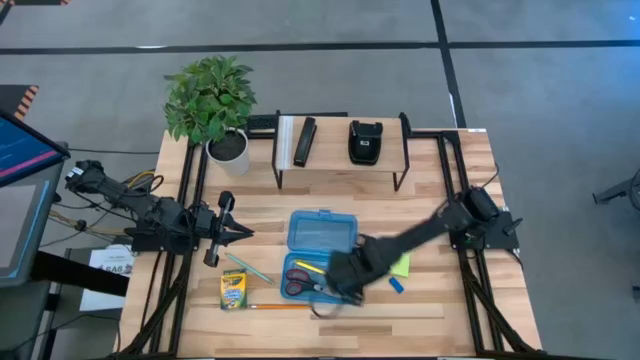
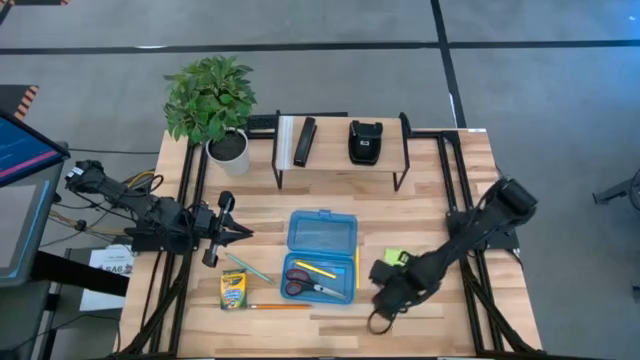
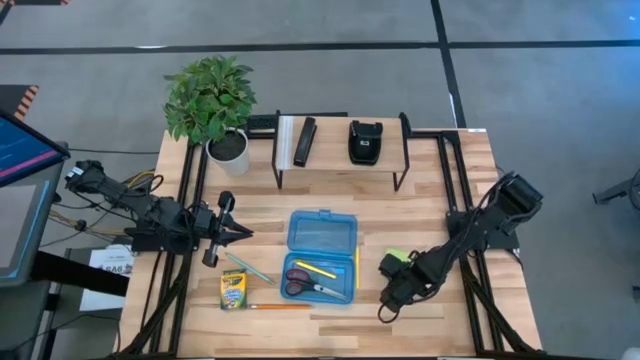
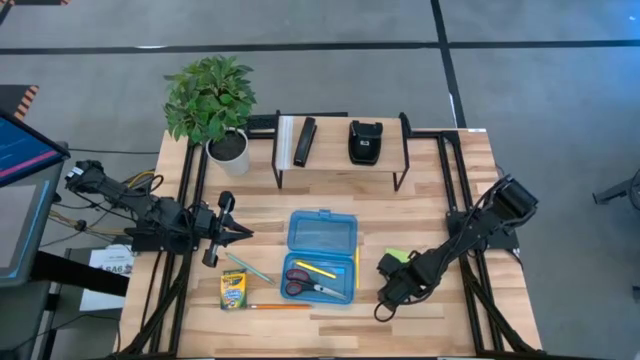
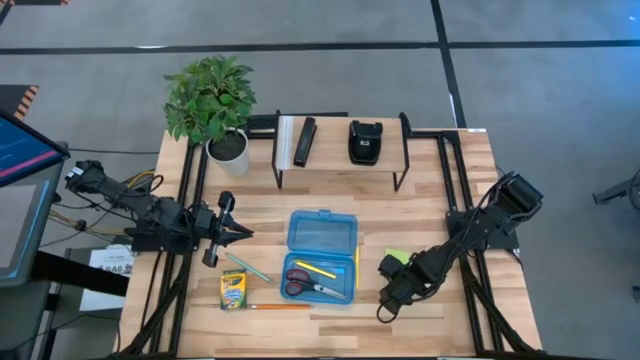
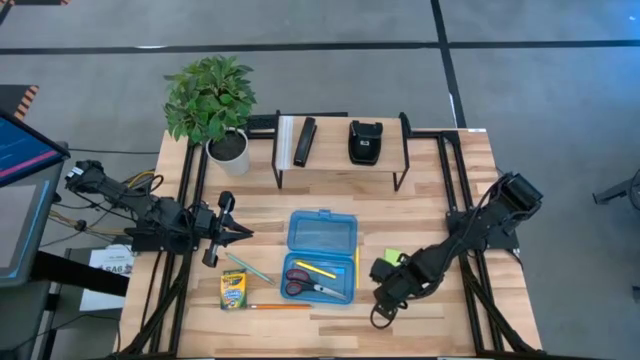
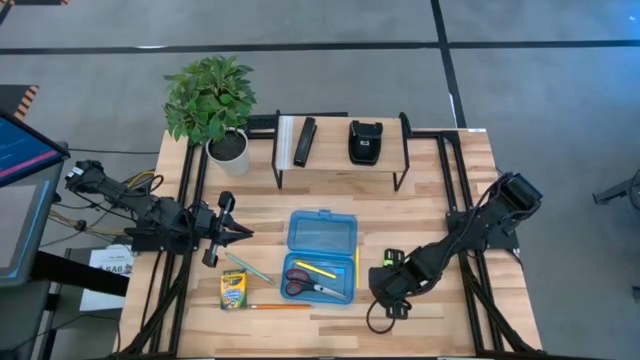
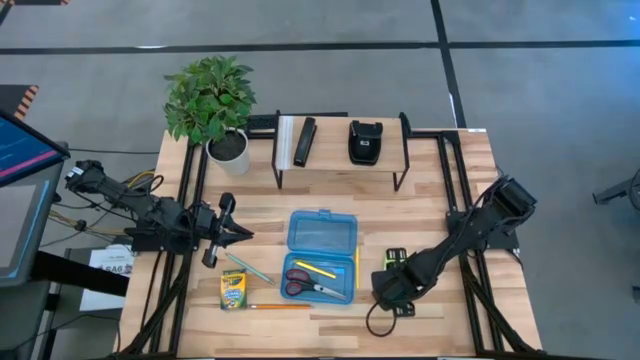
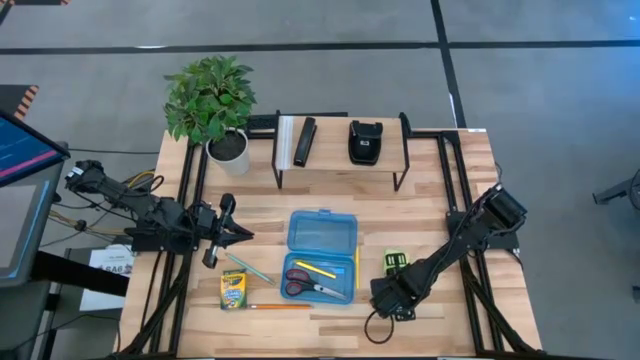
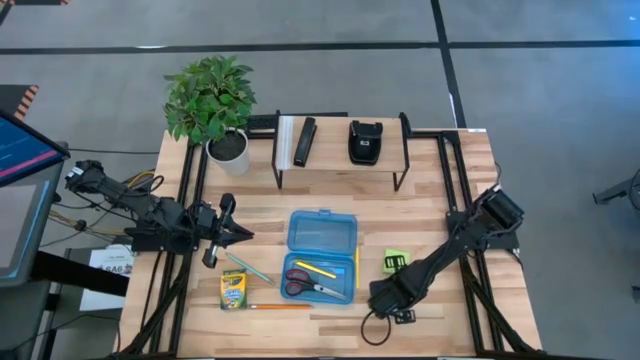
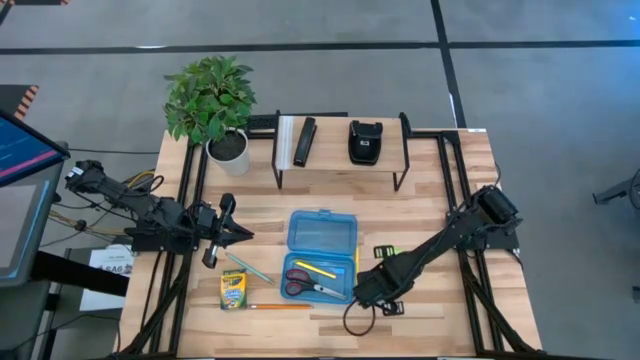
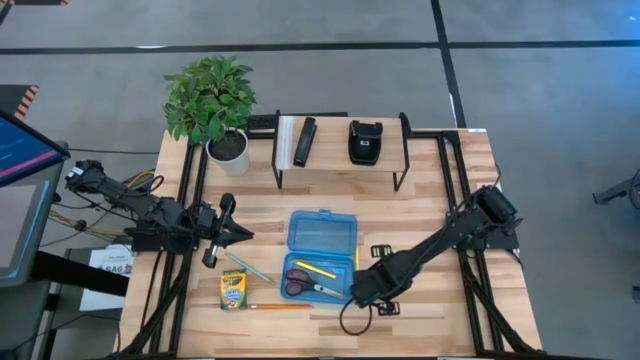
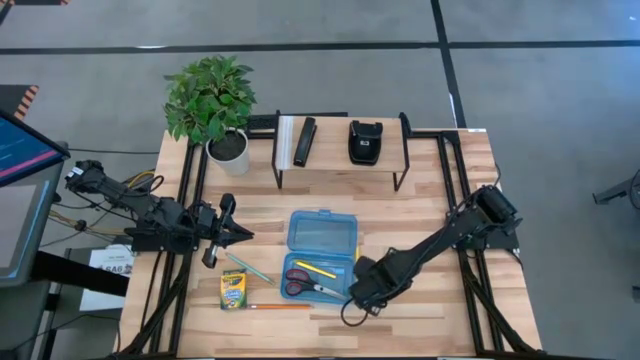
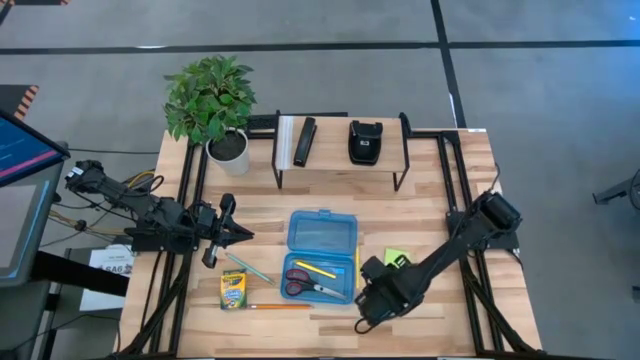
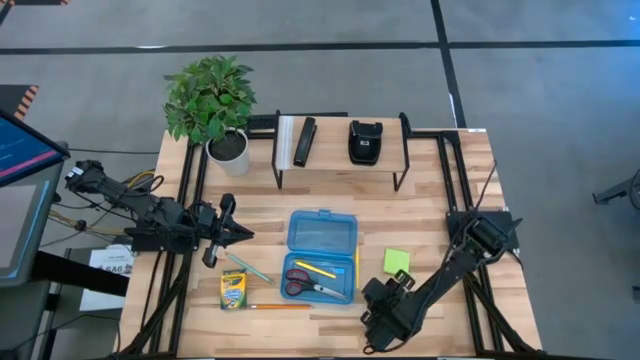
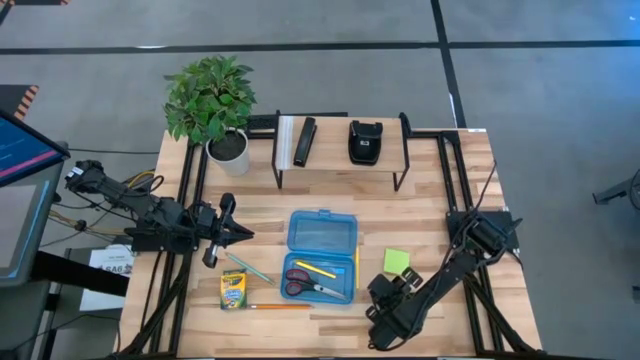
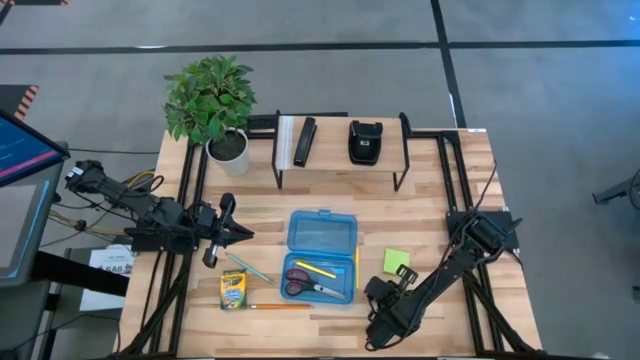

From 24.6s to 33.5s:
Task: Pack school essentials
Put the blue eraser into the supply box

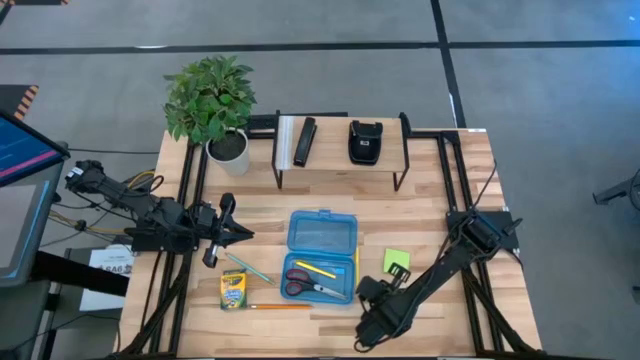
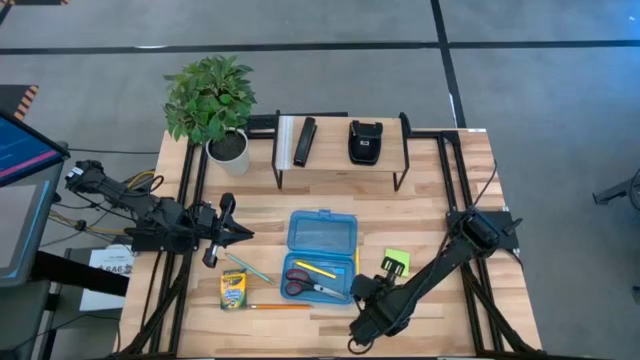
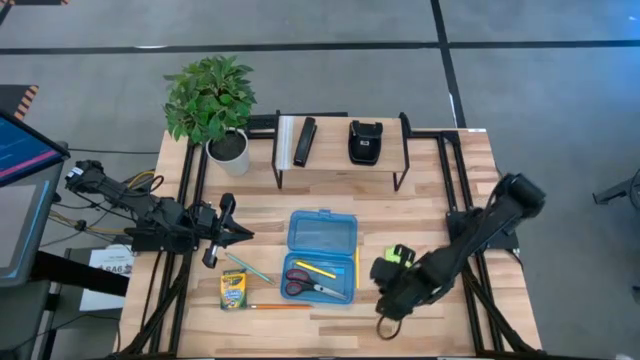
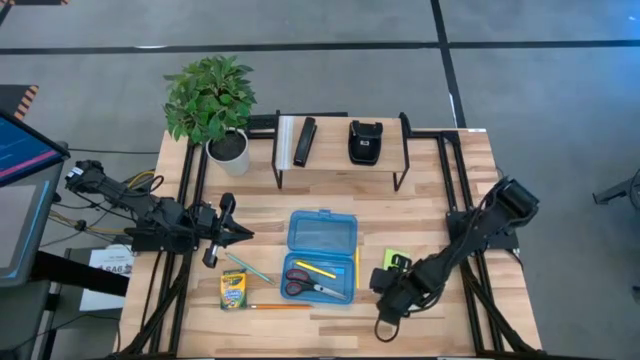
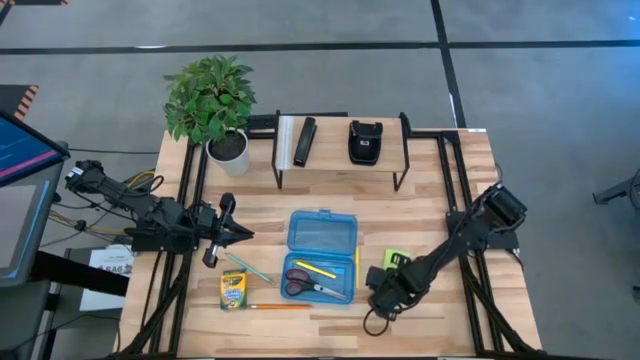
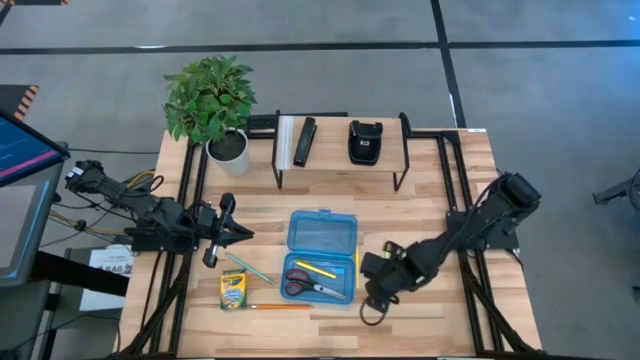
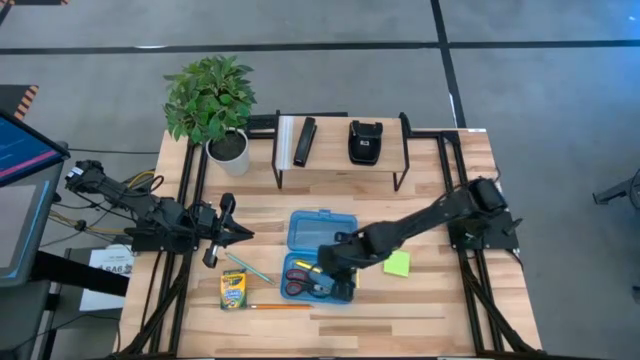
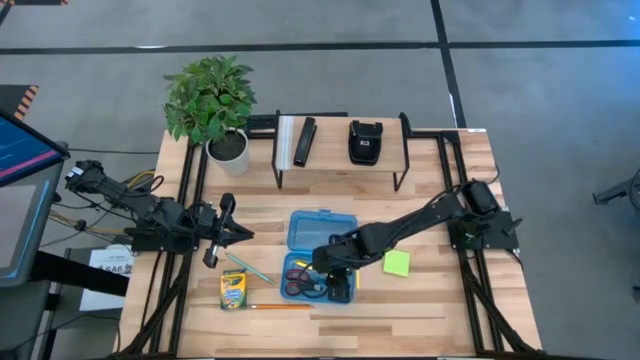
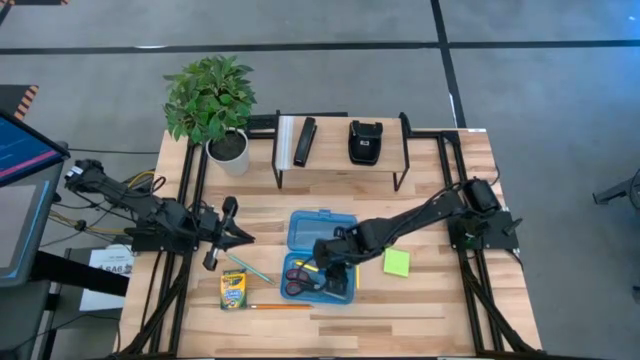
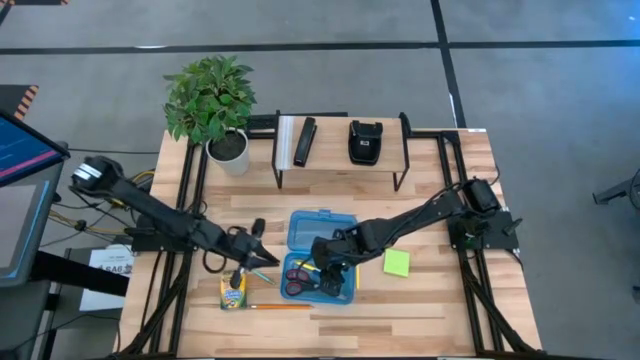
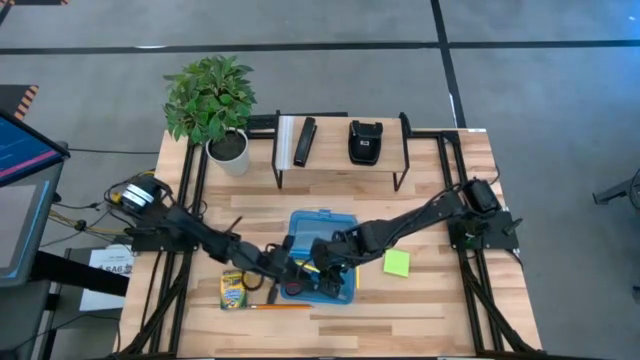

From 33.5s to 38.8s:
Put the blue eraser into the supply box

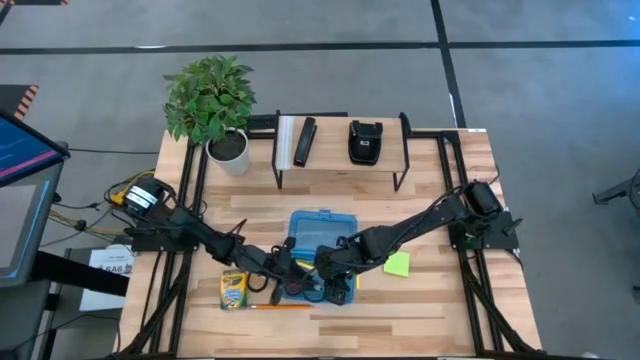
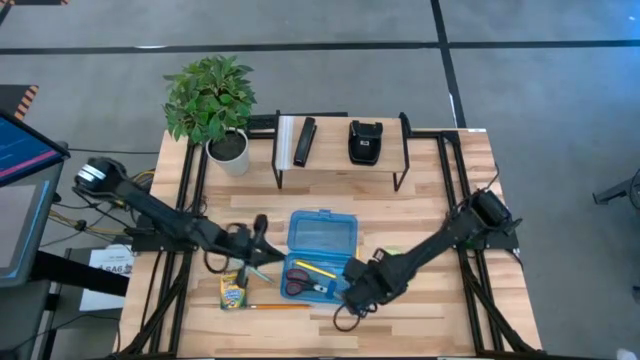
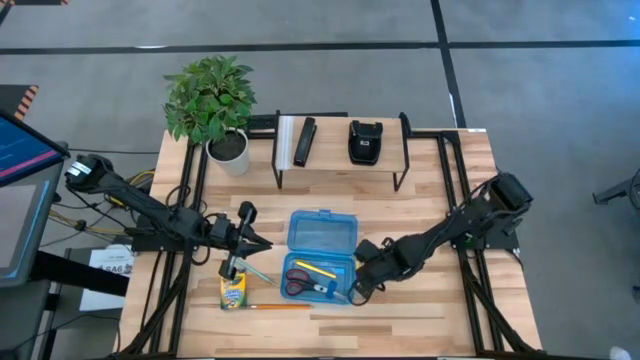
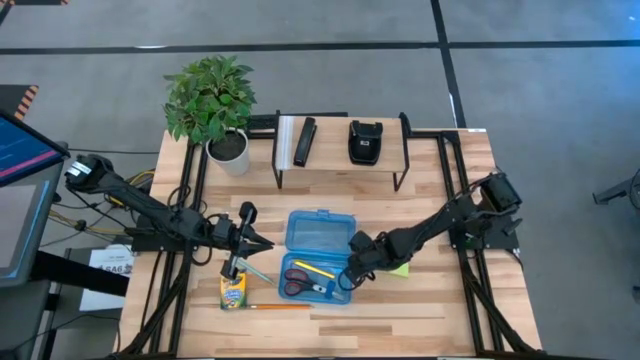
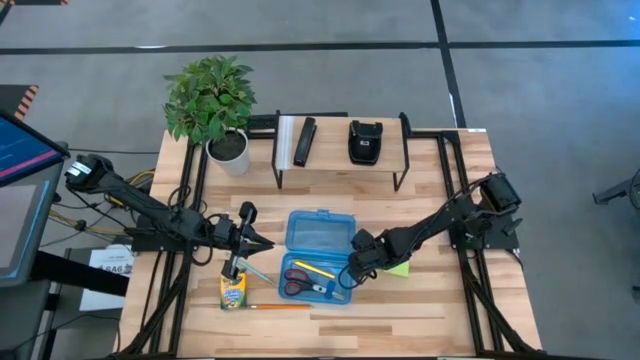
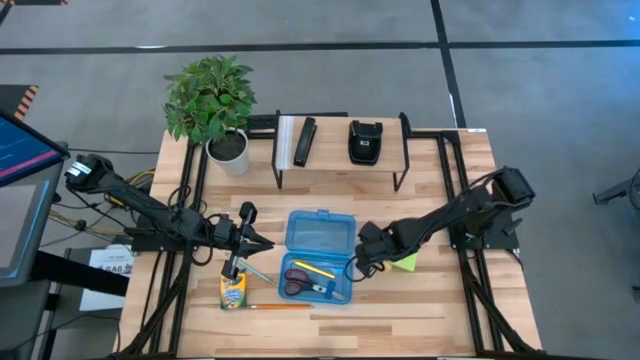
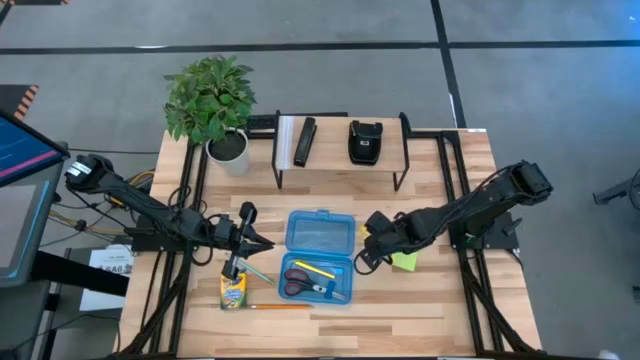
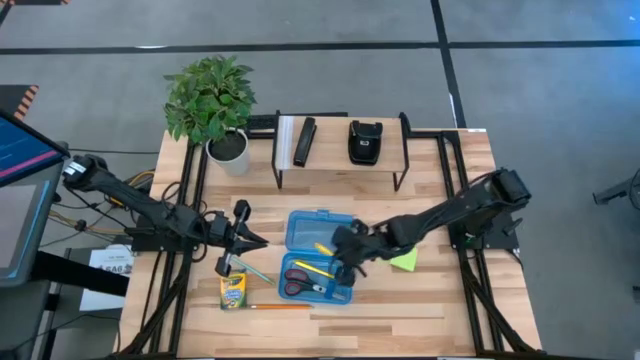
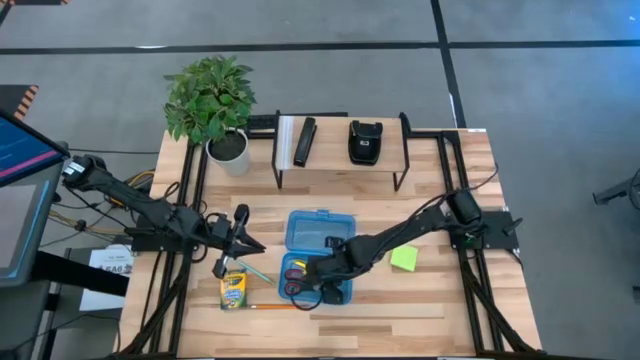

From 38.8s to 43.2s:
Put the yellow pen into the supply box

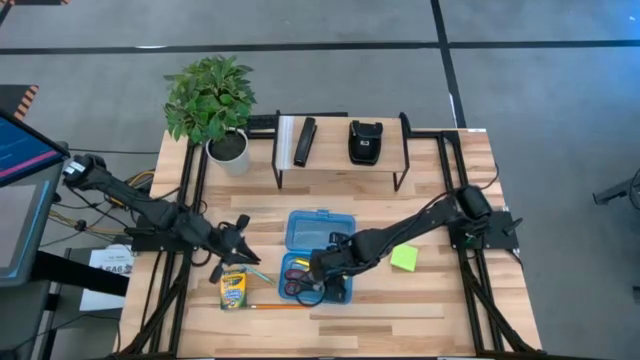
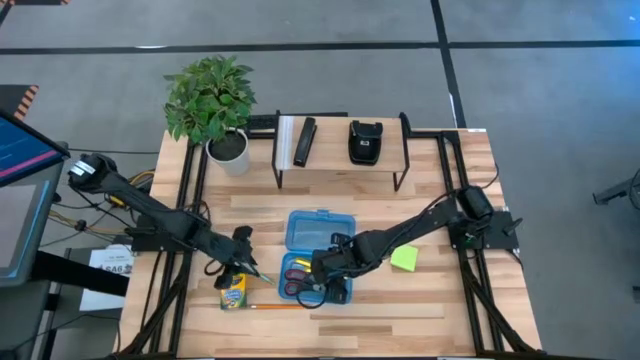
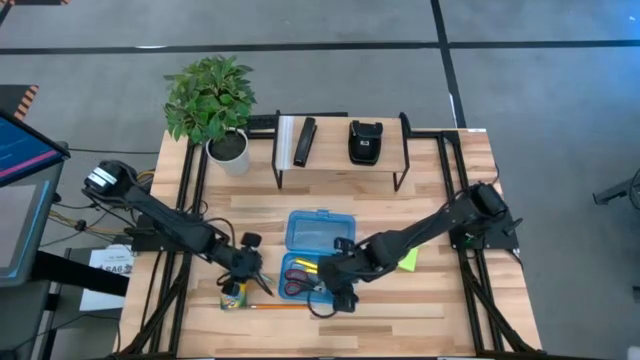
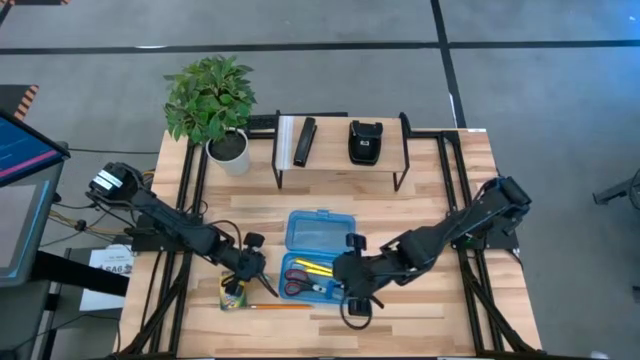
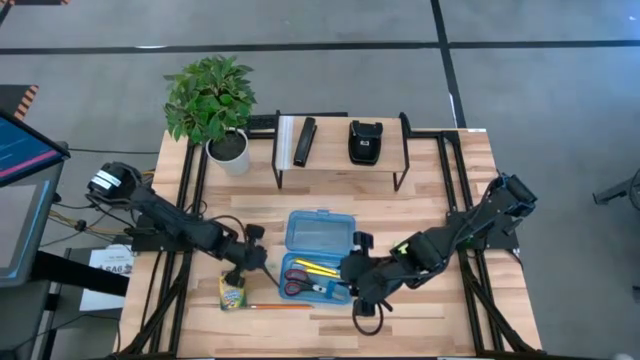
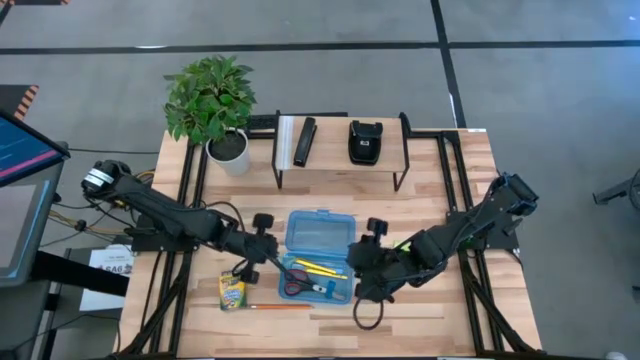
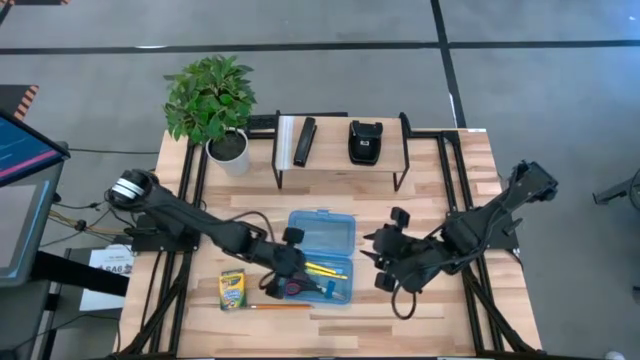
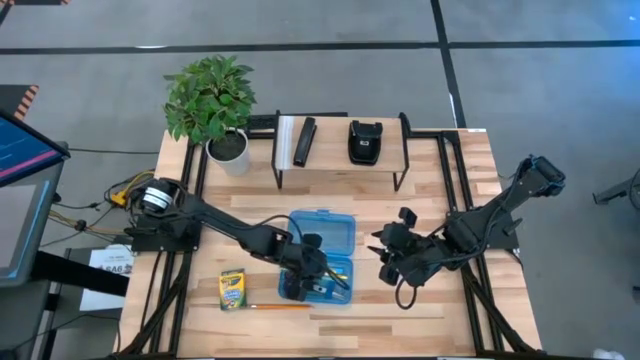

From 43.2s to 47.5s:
Put the light blue pencil into the supply box
